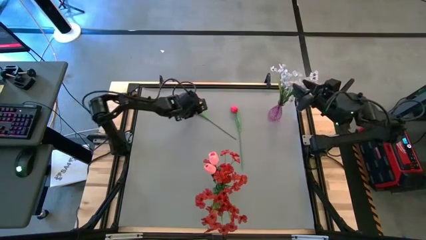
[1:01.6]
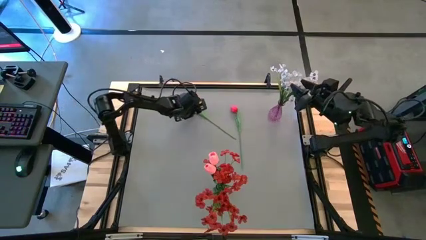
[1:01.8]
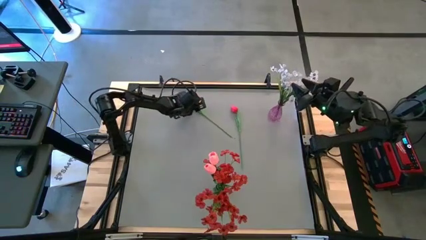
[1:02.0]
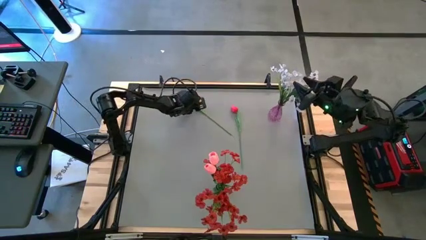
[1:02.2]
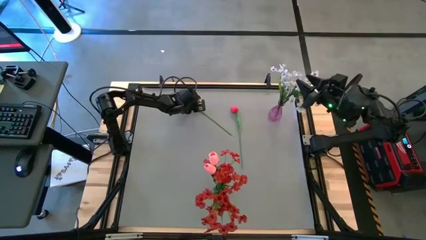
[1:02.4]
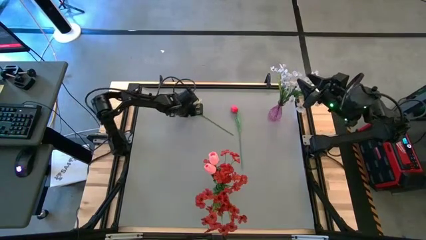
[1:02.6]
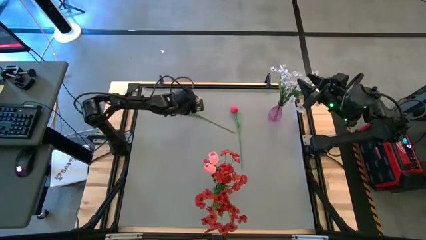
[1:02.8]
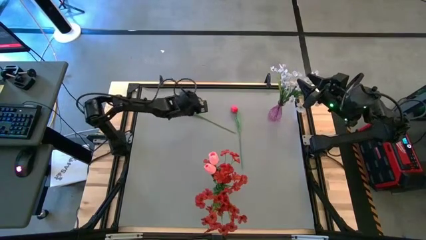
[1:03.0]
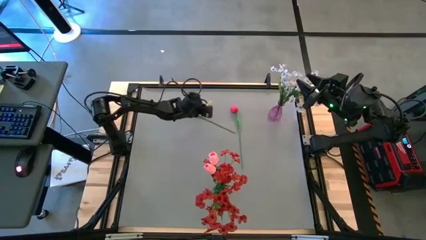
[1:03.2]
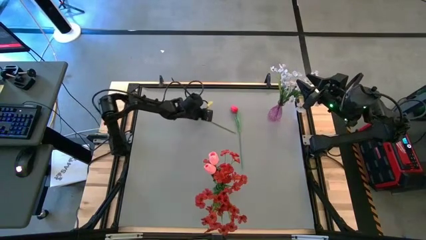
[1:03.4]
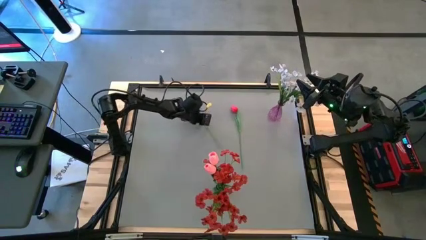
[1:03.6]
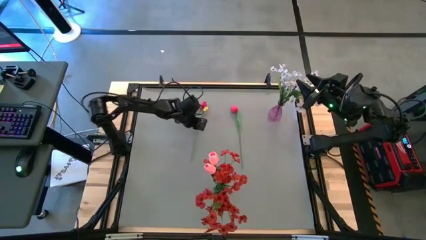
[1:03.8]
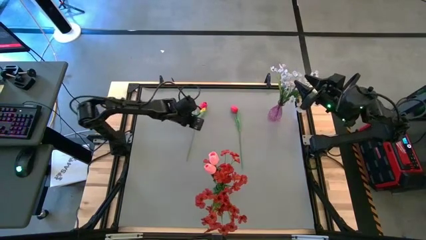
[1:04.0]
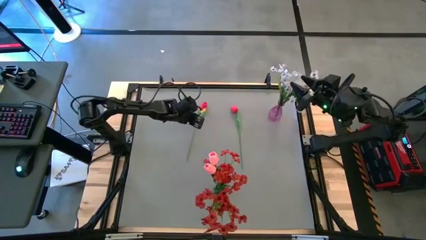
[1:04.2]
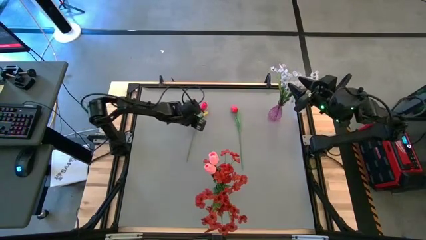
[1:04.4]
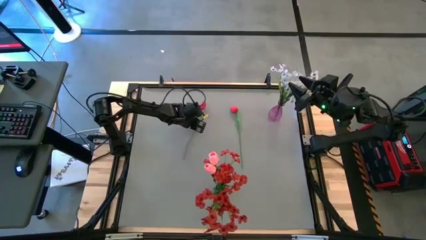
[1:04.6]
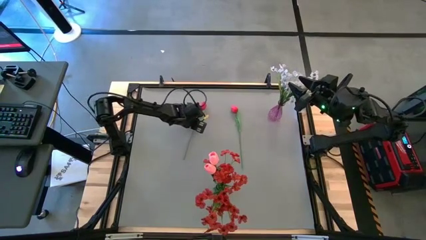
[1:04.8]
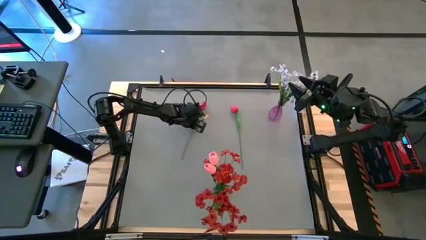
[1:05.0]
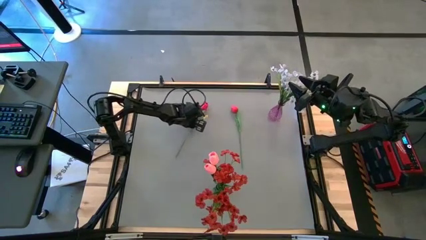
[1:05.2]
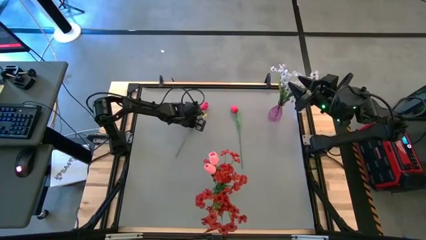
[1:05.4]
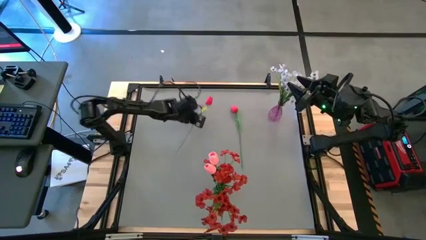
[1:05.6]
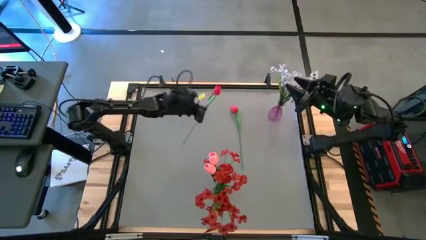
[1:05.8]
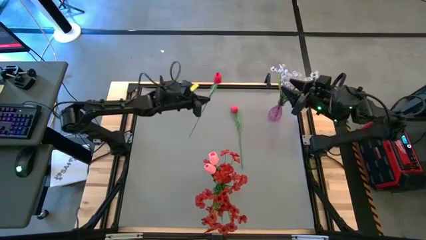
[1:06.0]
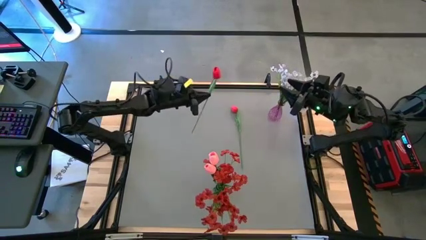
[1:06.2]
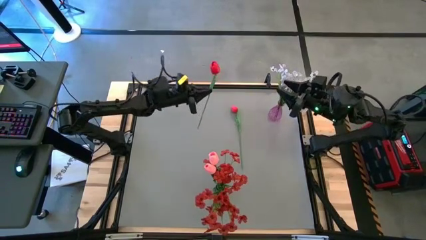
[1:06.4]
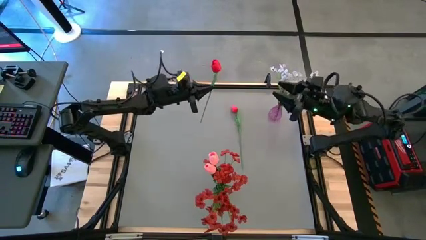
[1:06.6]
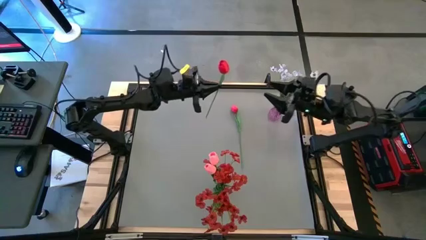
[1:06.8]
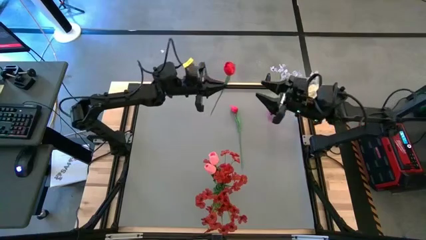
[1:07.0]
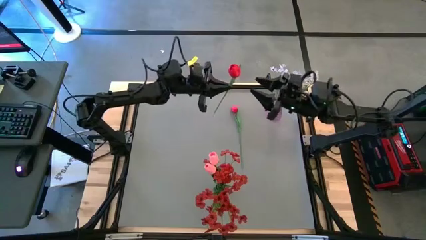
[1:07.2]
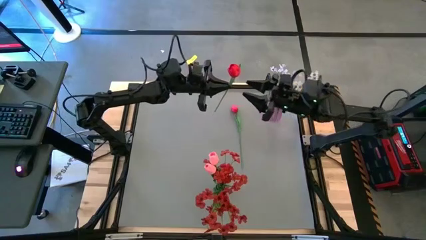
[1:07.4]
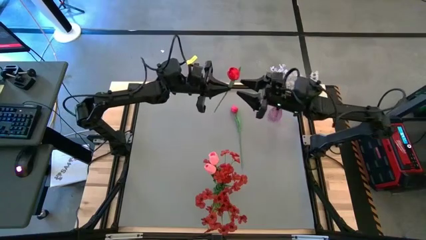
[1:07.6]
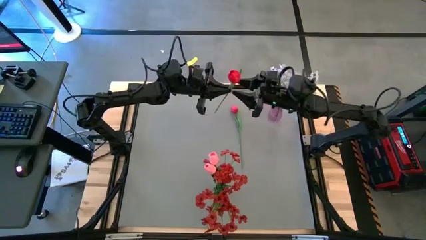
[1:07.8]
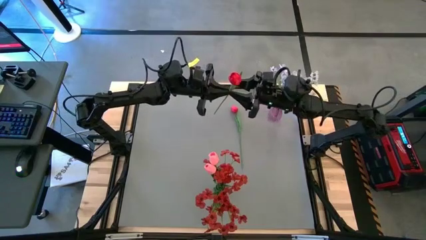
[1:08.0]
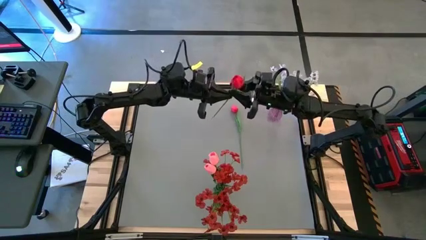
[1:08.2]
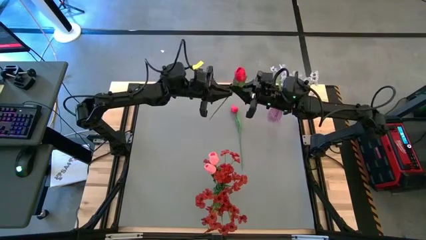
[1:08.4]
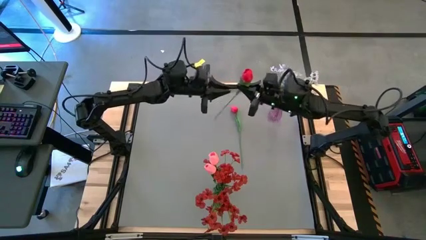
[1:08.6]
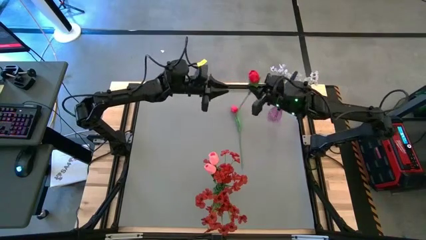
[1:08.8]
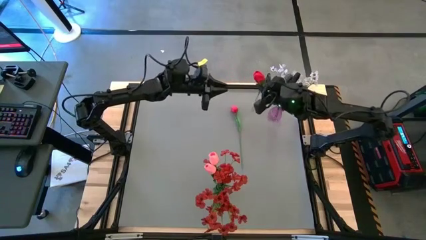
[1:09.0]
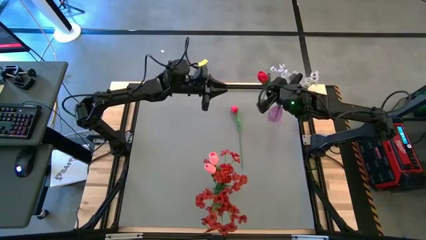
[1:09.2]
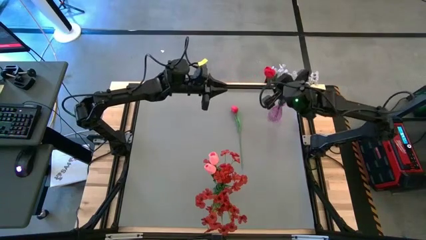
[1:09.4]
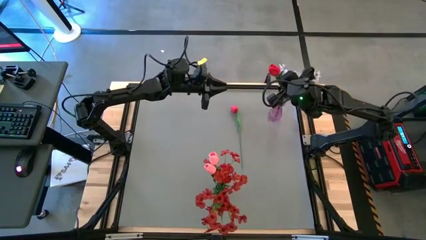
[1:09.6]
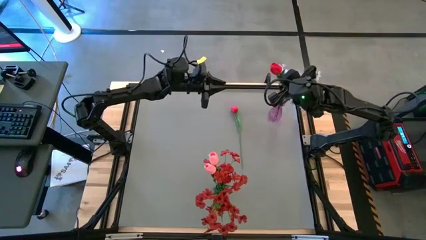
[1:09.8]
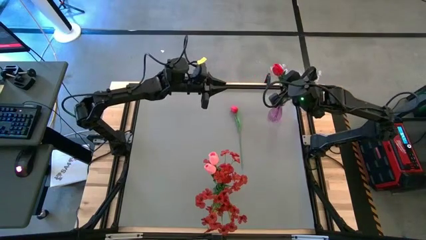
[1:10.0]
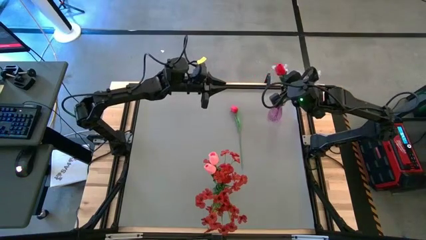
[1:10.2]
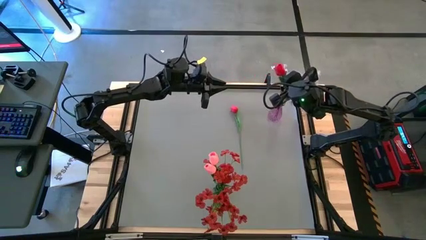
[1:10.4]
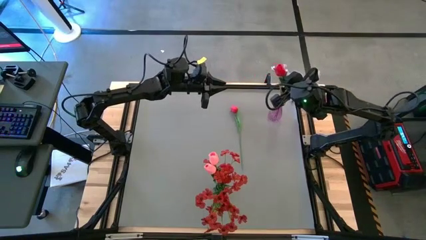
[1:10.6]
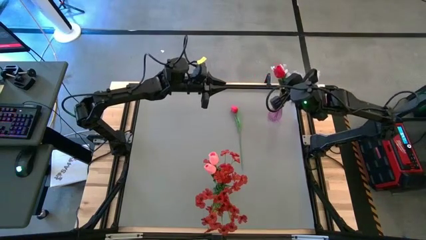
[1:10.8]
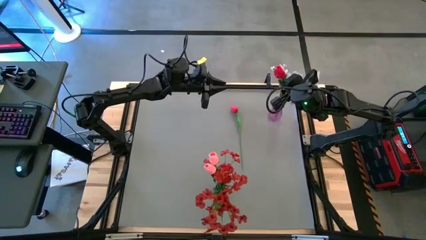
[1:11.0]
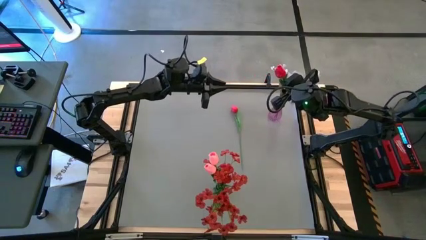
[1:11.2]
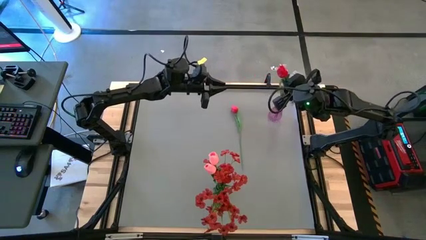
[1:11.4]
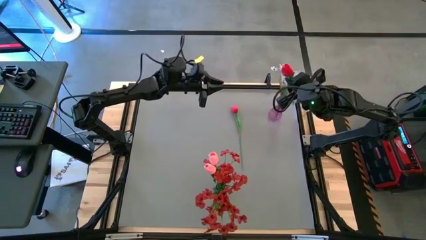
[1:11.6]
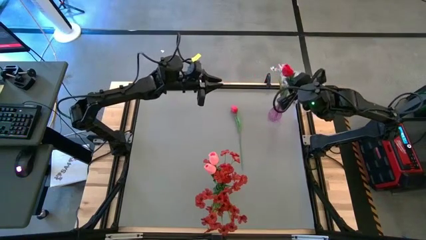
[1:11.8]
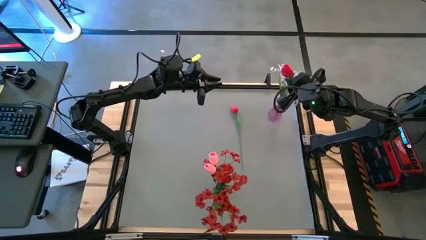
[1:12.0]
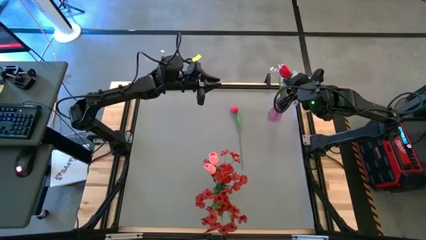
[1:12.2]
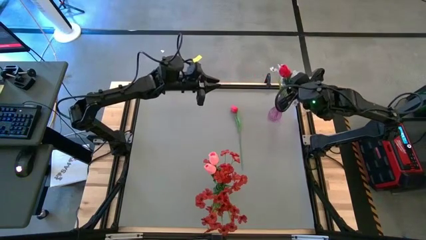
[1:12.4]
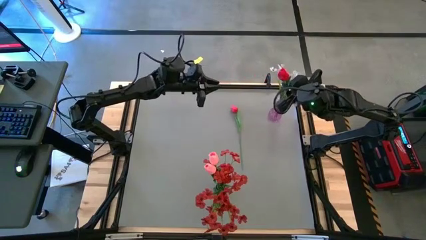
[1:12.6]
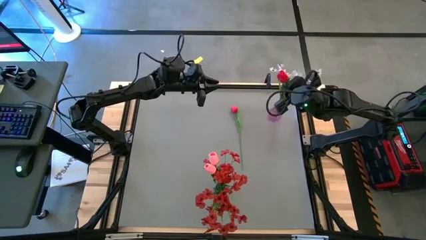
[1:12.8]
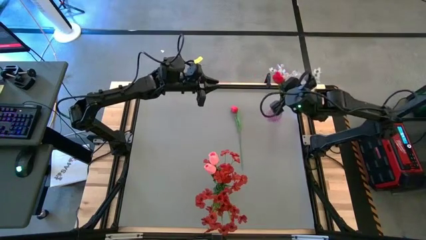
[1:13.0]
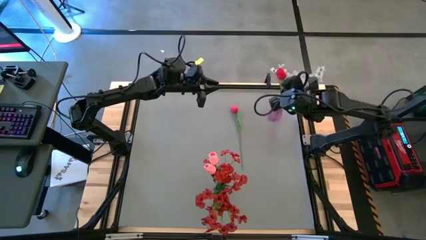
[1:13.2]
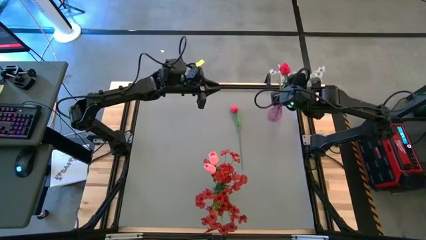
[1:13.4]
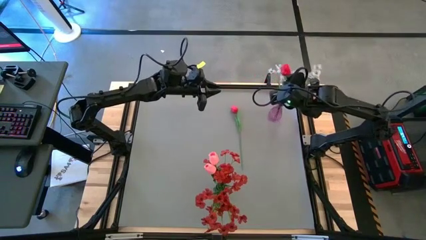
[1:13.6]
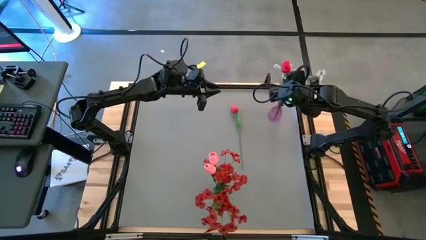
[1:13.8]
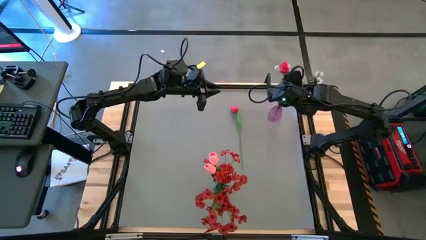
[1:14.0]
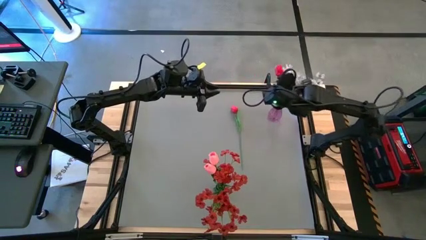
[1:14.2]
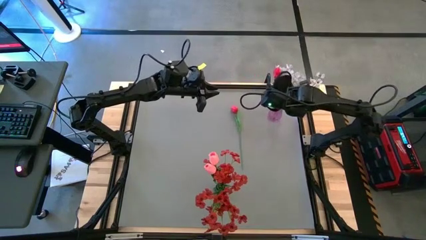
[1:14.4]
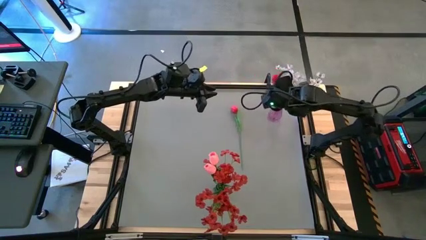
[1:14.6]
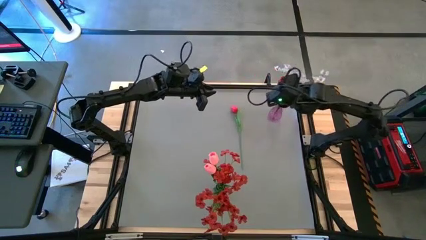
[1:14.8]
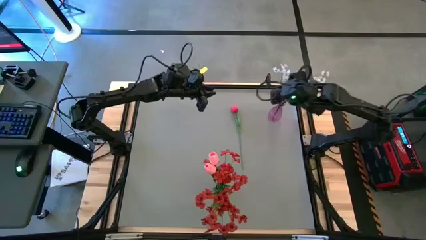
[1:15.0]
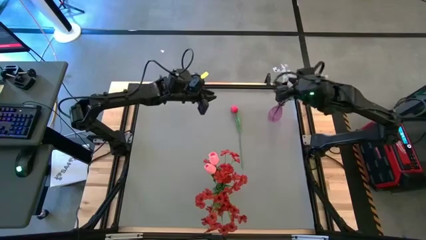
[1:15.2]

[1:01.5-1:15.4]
Task: Sort flowers into vase by color
Put the left red flower into the purple vase

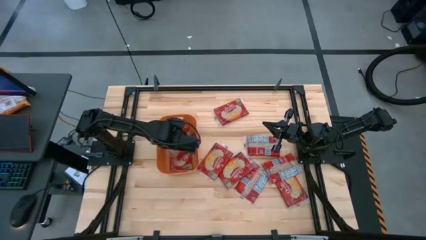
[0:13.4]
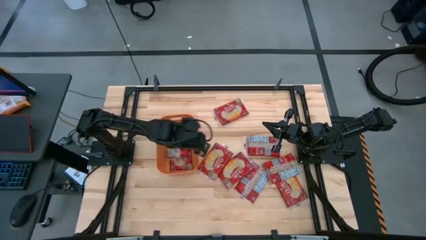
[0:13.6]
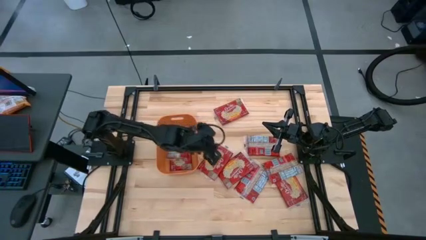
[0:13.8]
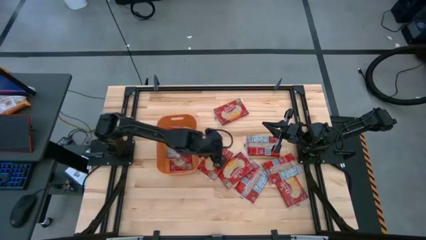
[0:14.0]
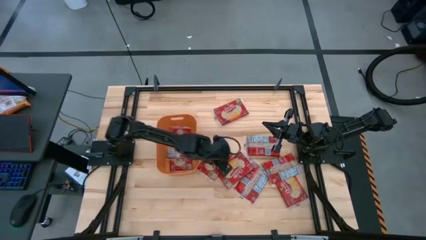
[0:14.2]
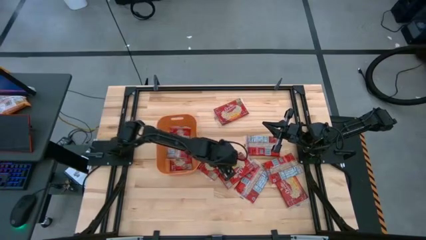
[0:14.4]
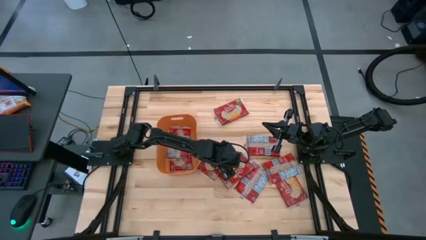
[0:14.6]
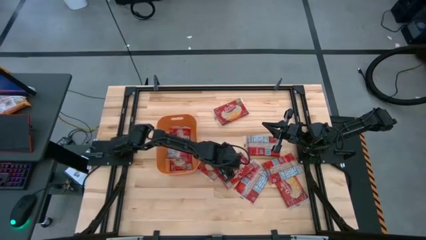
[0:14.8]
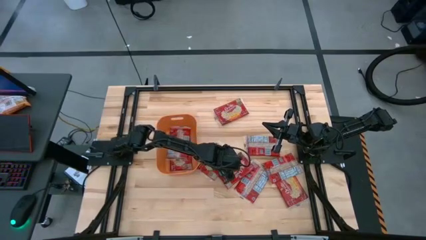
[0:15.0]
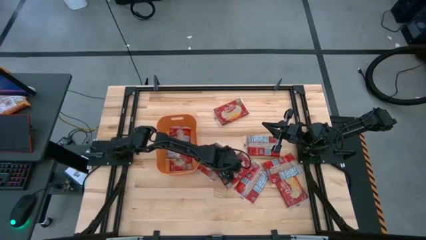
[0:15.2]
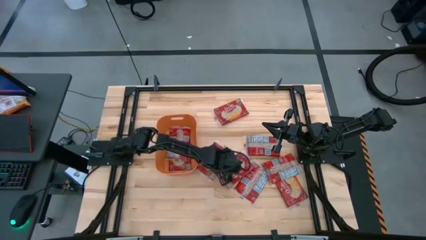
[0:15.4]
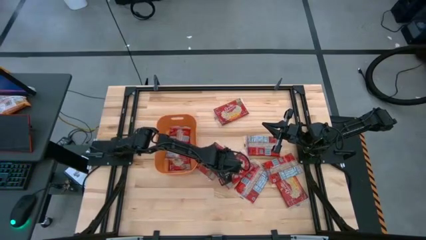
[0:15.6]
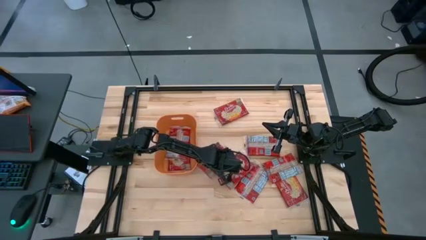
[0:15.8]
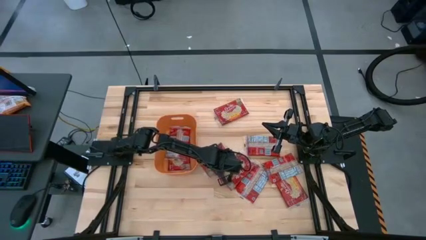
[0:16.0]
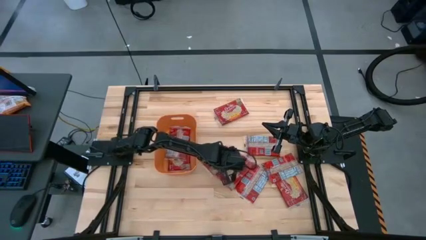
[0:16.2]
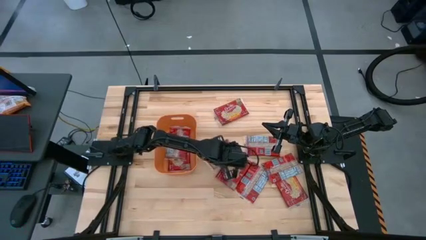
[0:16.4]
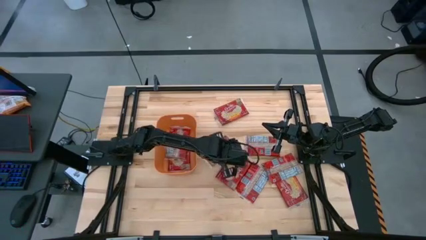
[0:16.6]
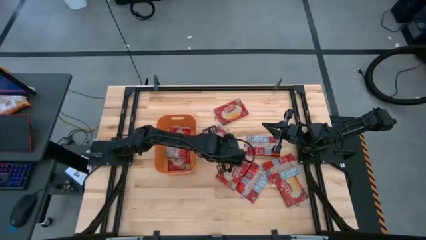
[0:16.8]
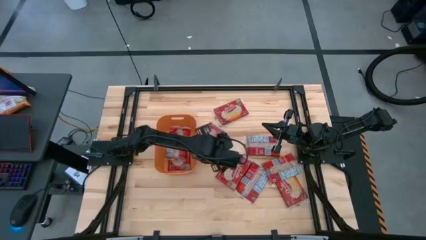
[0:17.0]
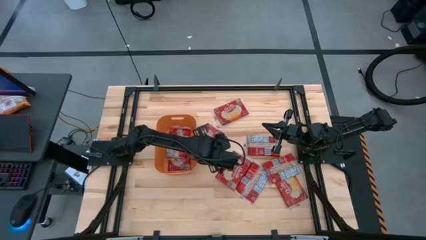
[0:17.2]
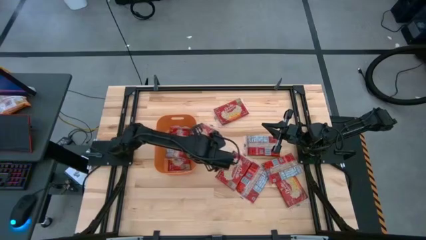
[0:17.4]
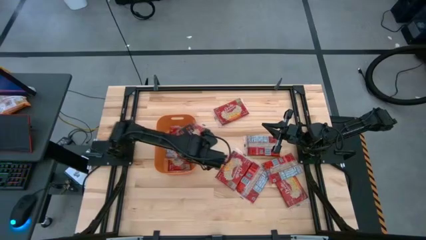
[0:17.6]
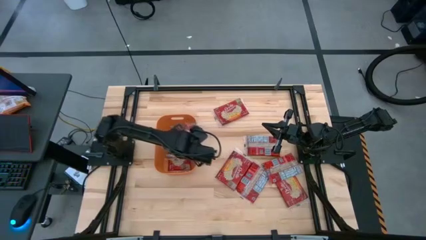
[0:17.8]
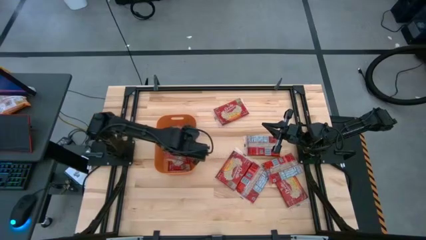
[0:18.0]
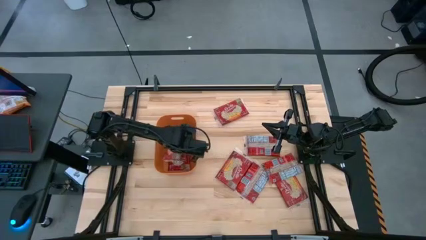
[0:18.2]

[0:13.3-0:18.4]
Task: Sort popcorn bags into baskets
Put the popcorn bag into the orange bin
